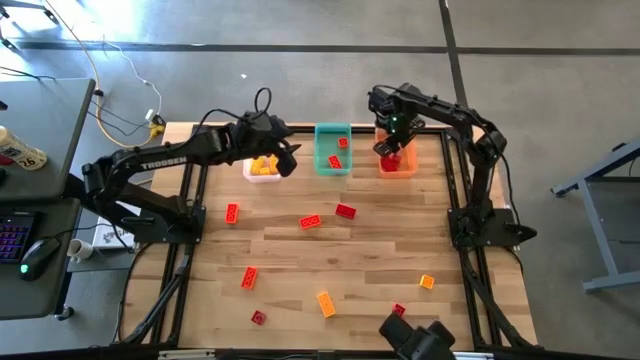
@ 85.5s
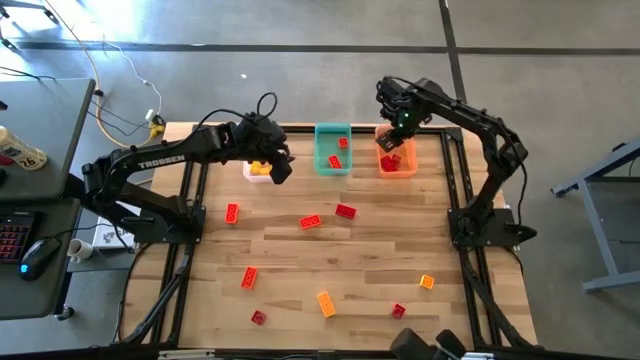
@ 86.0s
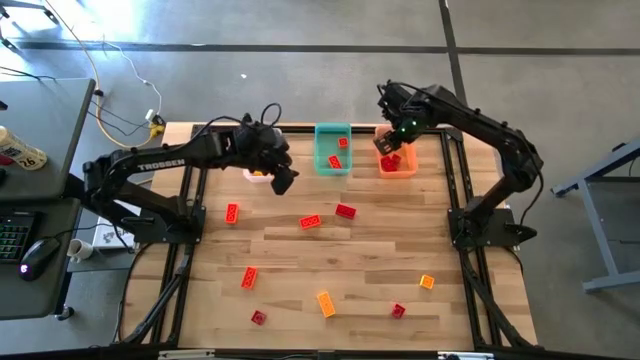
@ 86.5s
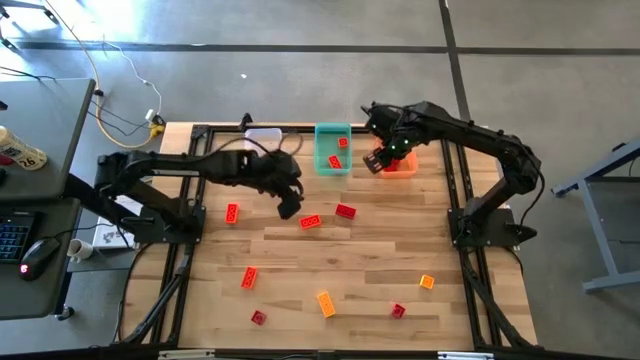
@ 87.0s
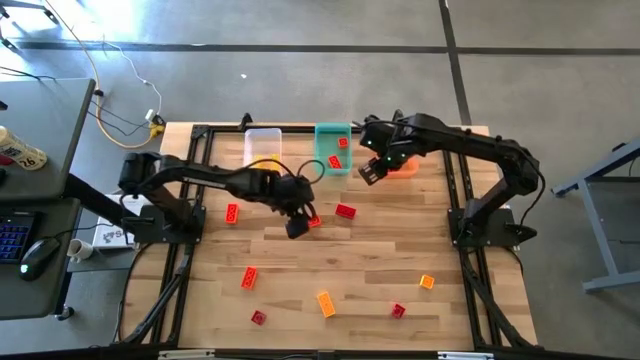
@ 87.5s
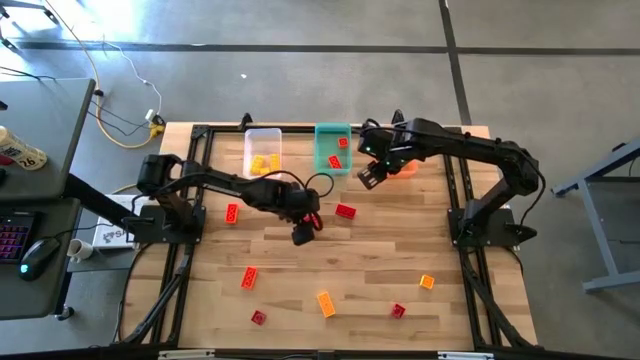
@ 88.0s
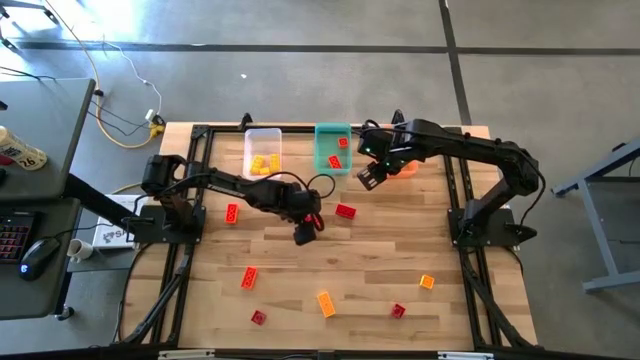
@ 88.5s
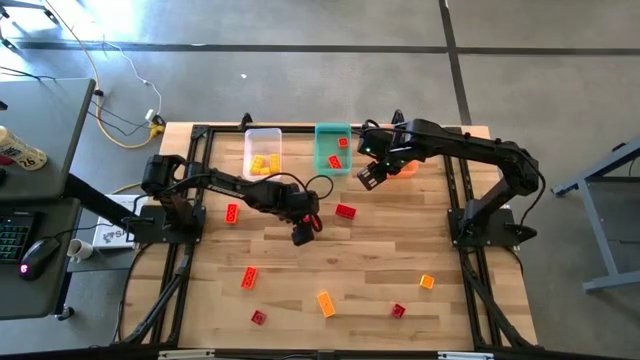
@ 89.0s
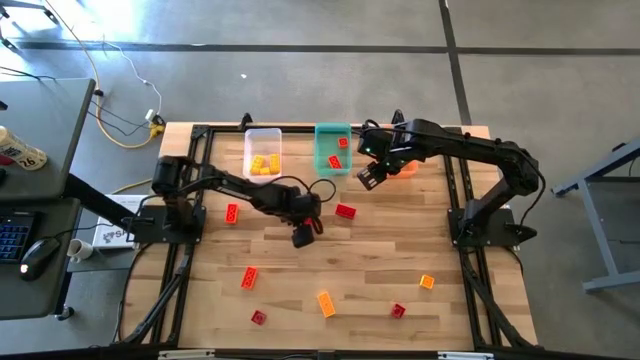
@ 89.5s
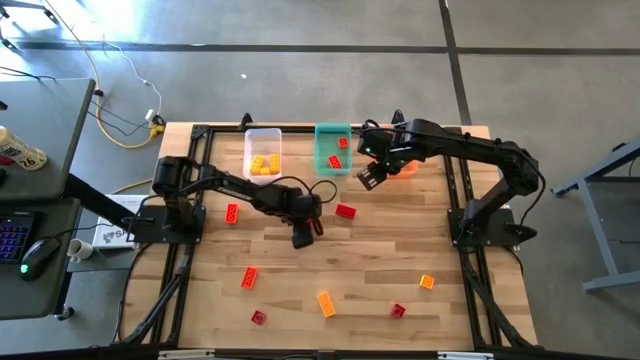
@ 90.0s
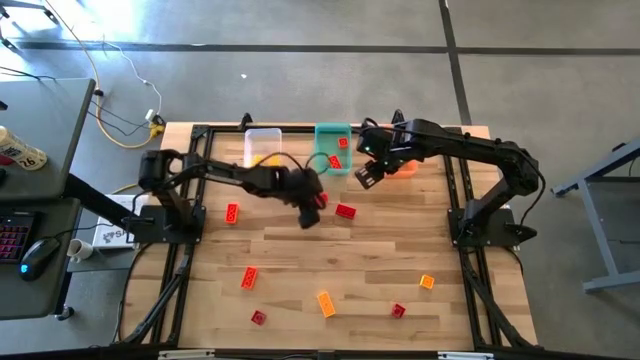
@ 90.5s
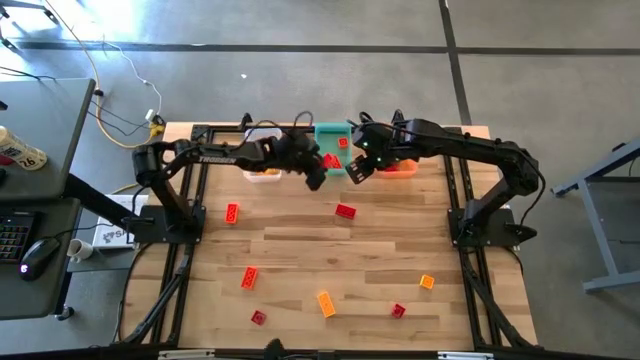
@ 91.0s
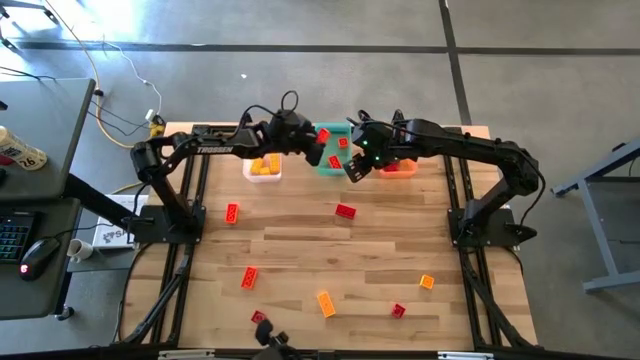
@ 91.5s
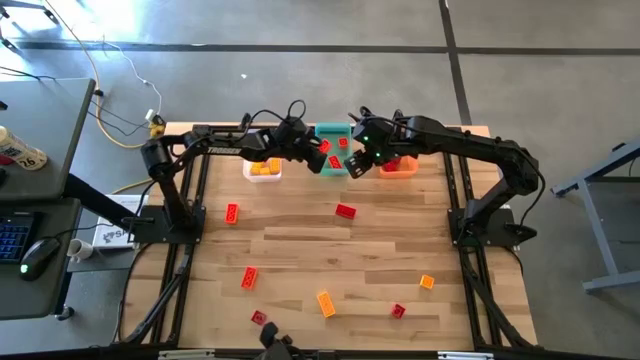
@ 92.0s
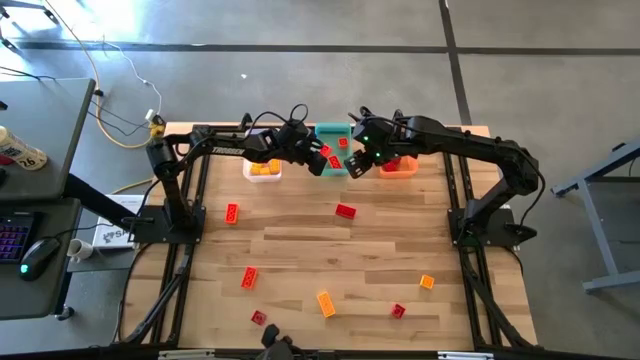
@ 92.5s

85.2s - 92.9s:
Task: Sort & place blocks by color
Put the orange game piece into the blue bin

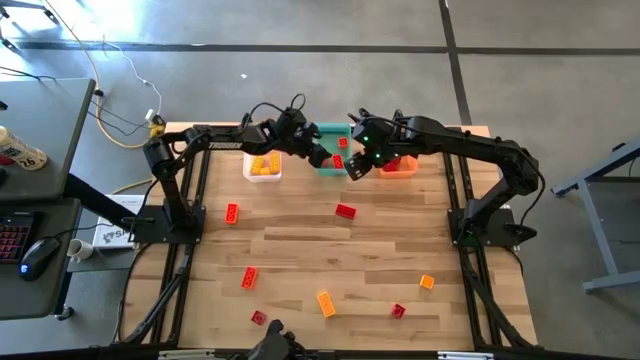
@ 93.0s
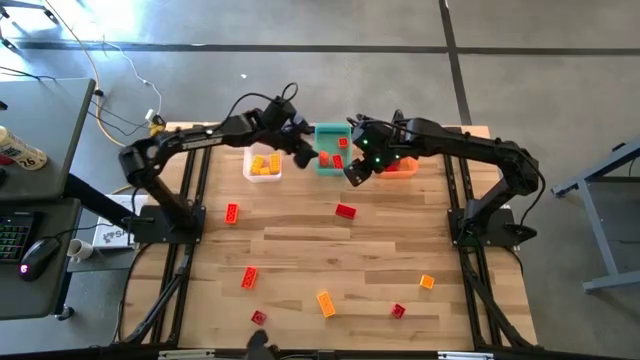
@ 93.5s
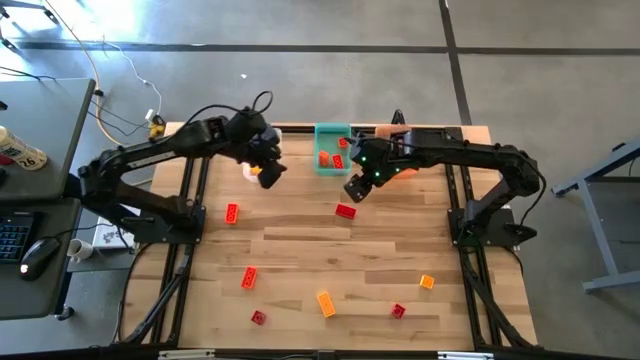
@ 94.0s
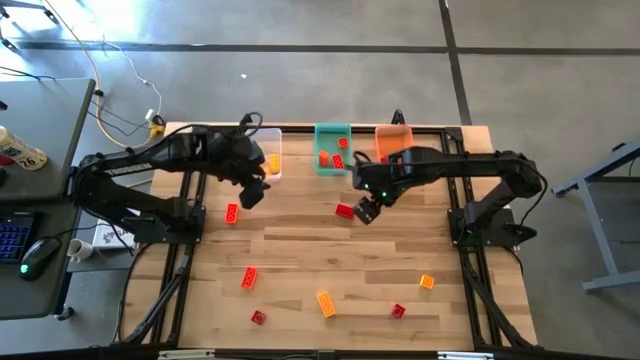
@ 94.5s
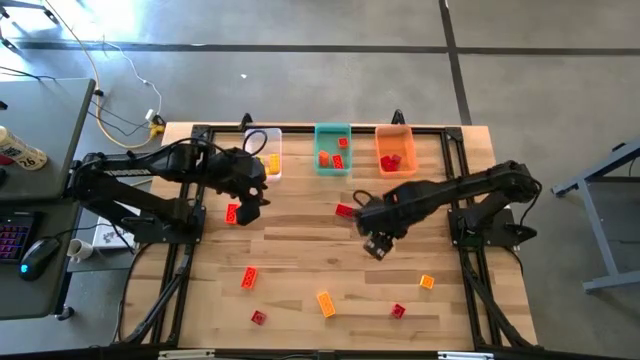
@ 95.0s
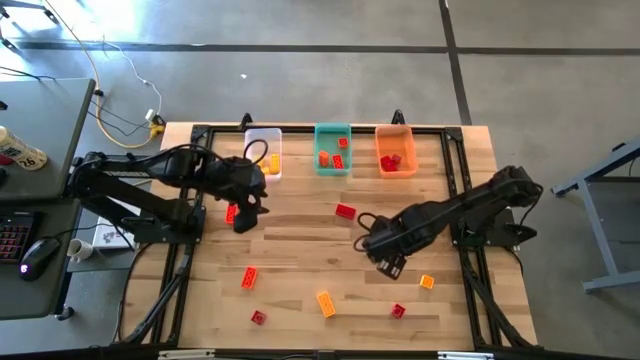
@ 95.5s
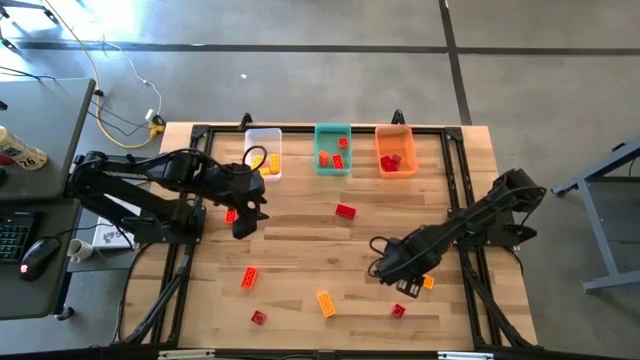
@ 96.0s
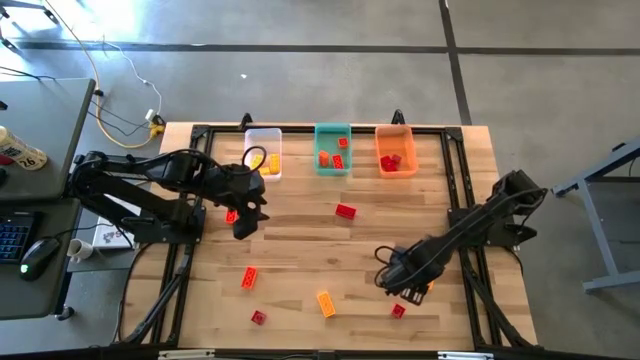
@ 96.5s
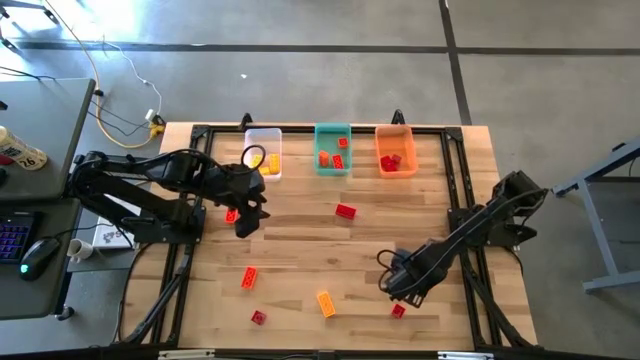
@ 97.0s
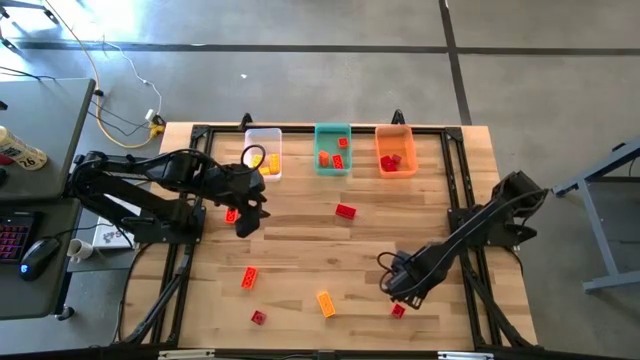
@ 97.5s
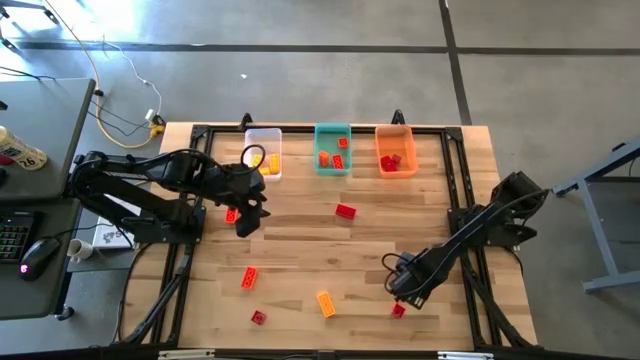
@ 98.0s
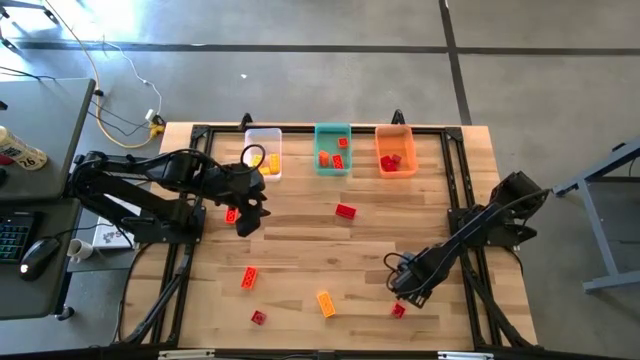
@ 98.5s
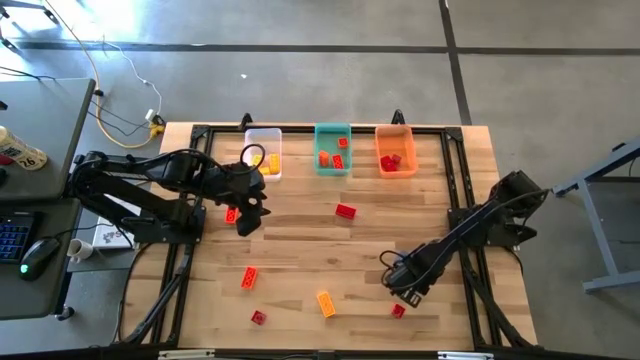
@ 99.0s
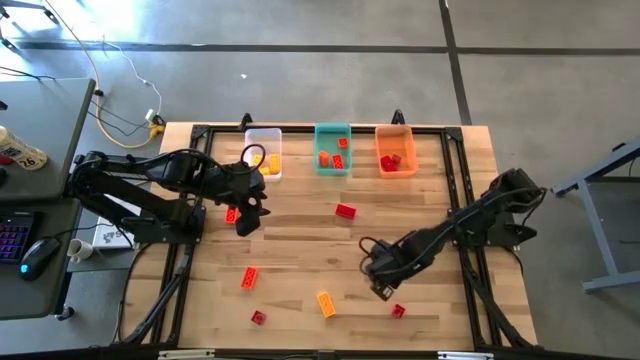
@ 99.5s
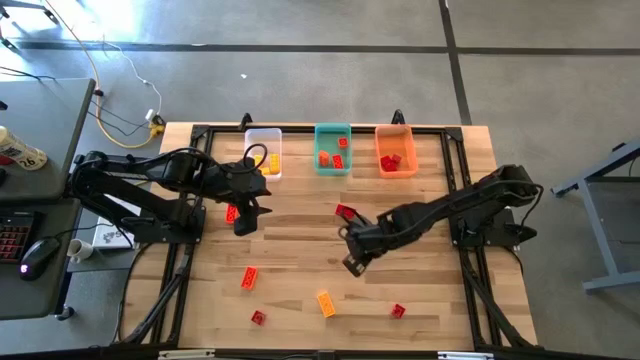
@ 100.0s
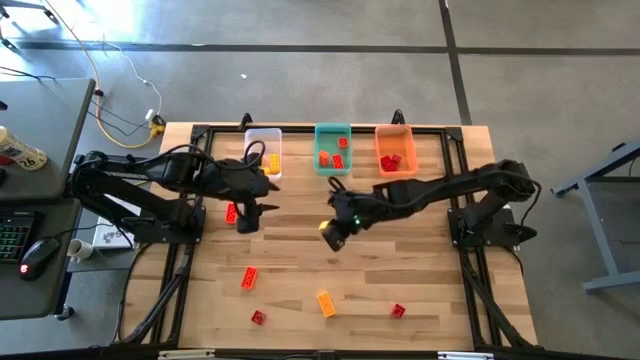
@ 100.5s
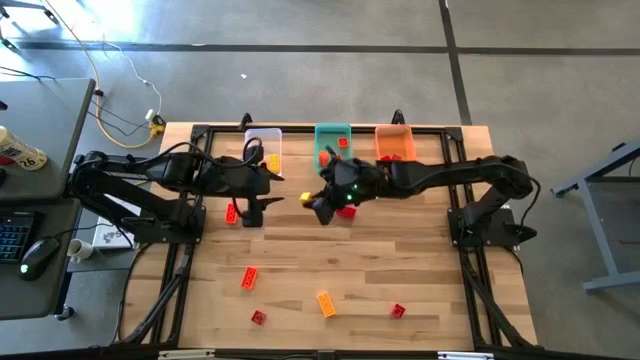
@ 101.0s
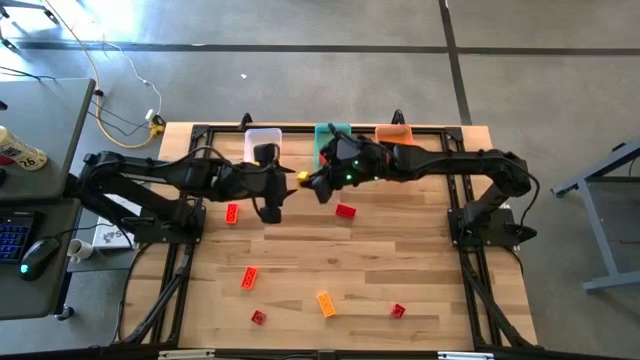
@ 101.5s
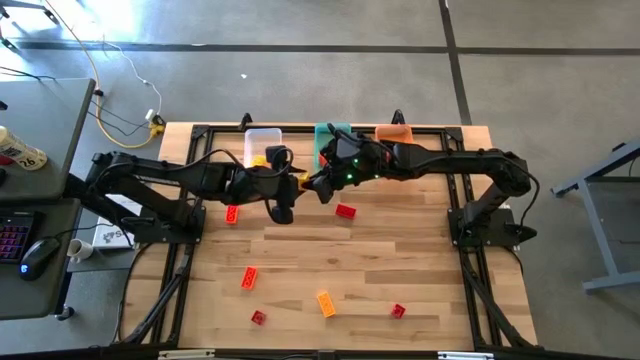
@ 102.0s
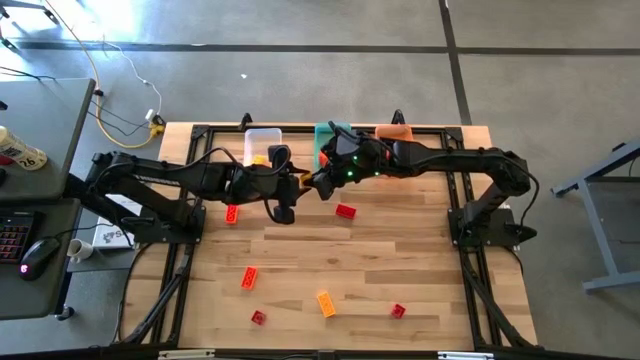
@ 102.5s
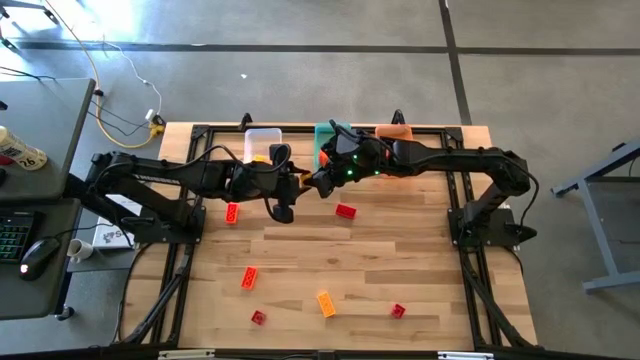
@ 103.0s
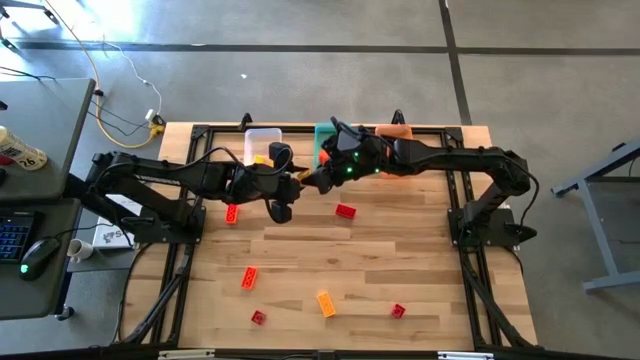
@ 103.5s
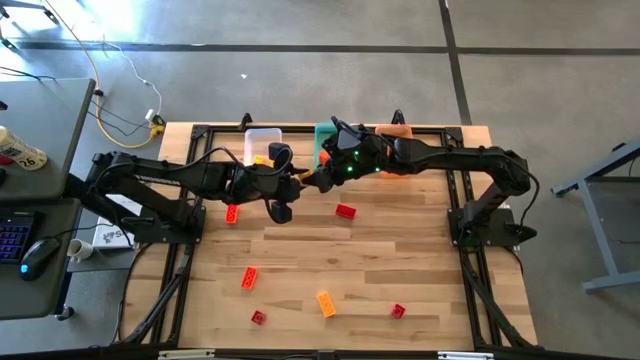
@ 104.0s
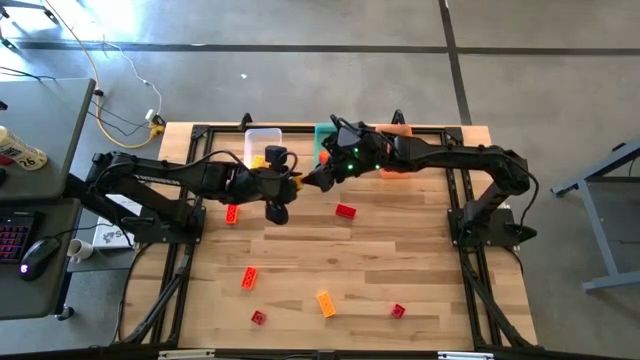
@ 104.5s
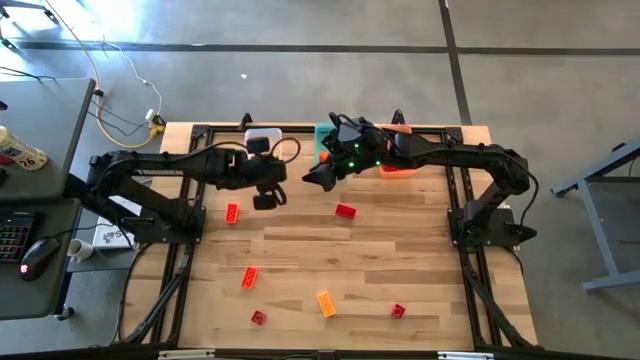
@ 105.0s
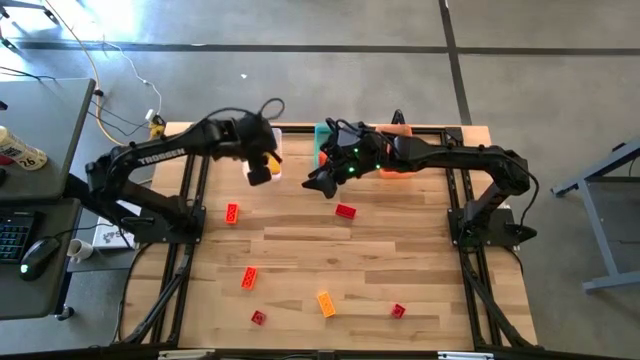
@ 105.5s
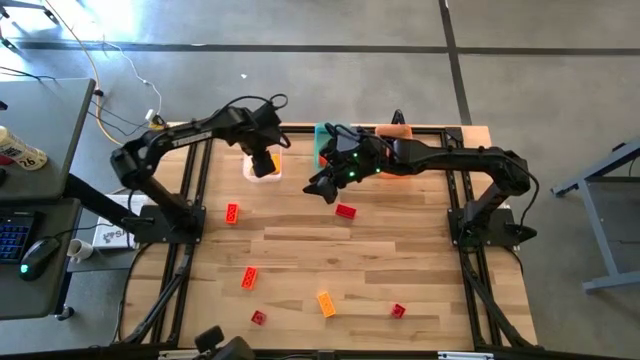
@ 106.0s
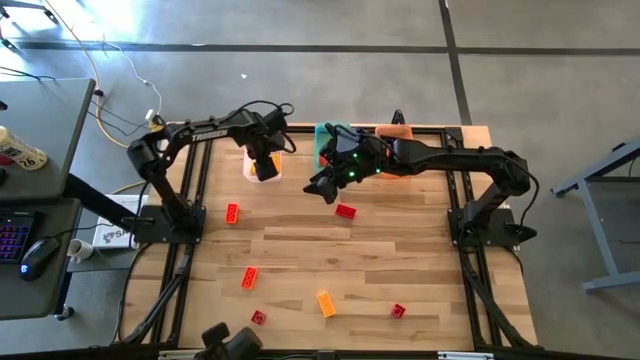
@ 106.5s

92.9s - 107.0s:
Put the yellow game piece into the transparent bin
